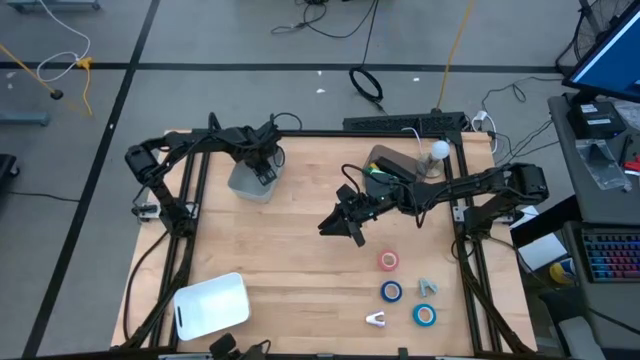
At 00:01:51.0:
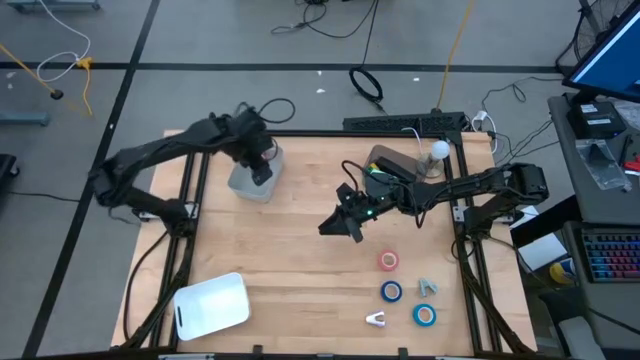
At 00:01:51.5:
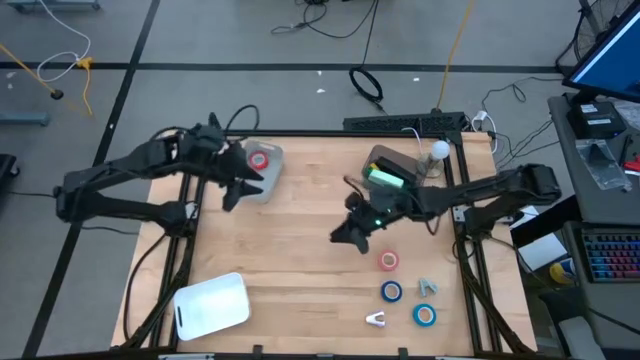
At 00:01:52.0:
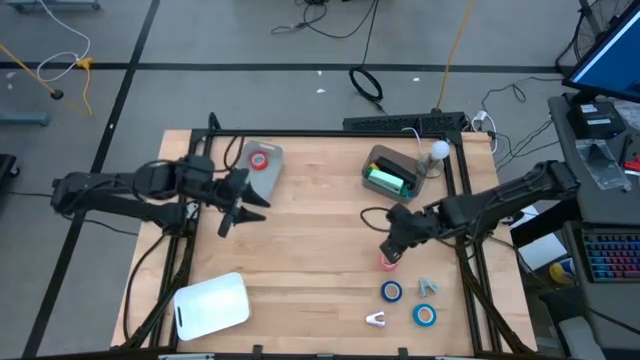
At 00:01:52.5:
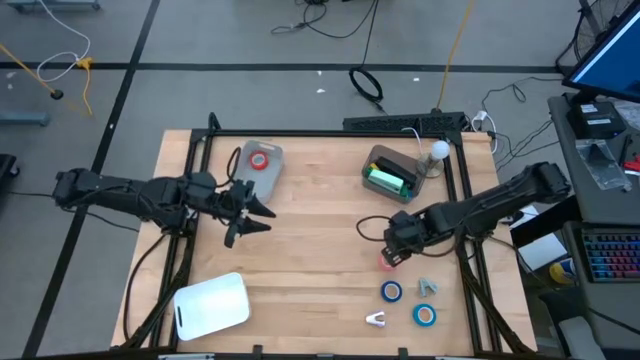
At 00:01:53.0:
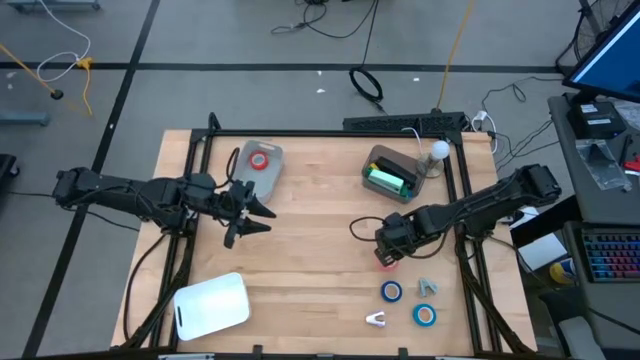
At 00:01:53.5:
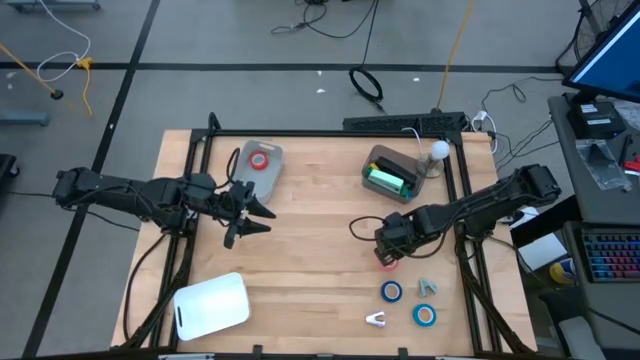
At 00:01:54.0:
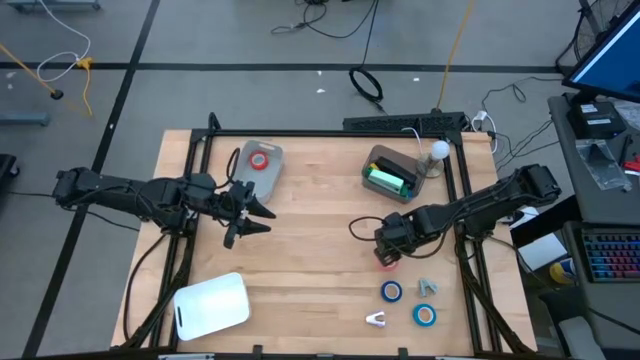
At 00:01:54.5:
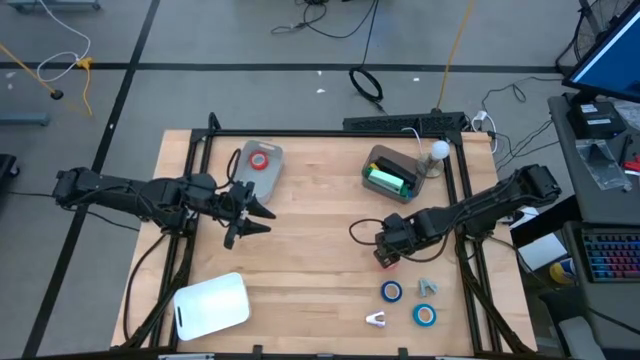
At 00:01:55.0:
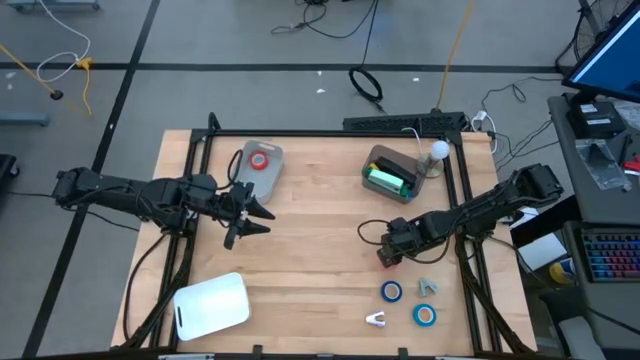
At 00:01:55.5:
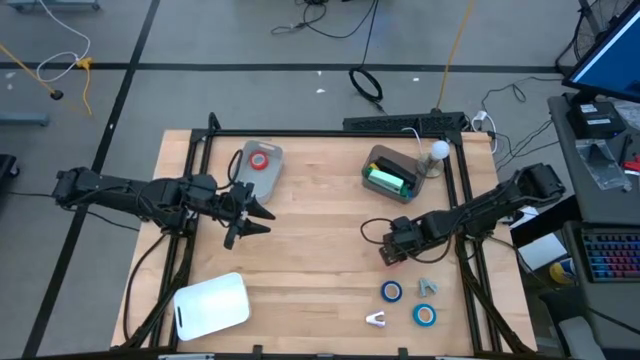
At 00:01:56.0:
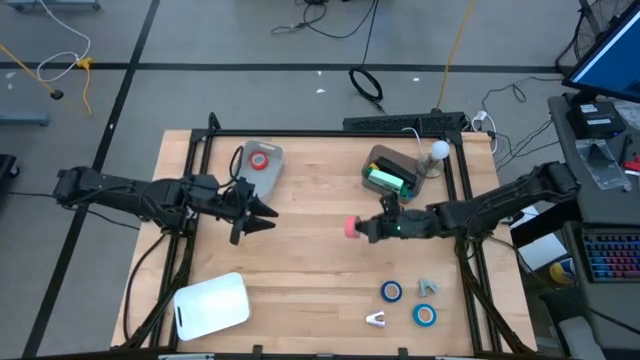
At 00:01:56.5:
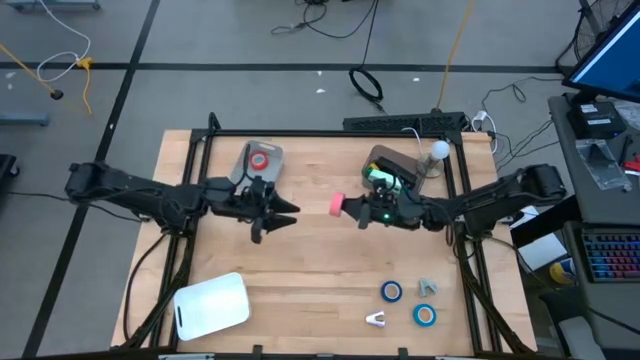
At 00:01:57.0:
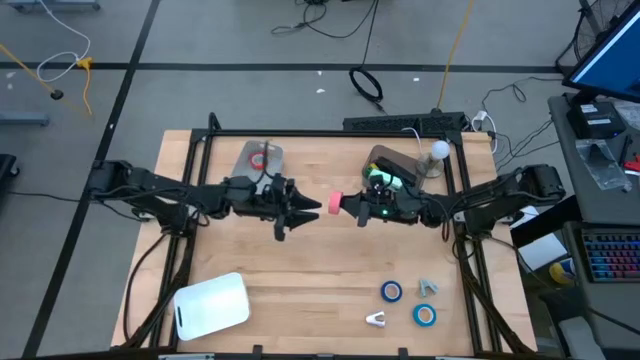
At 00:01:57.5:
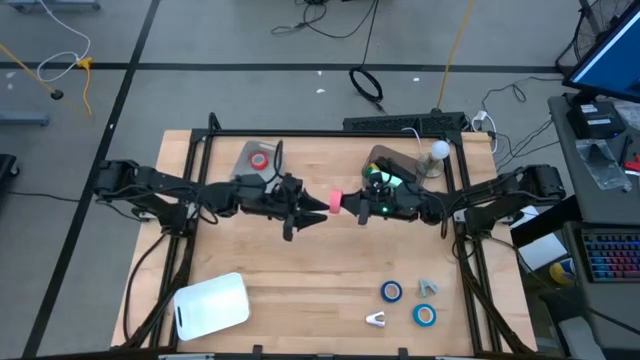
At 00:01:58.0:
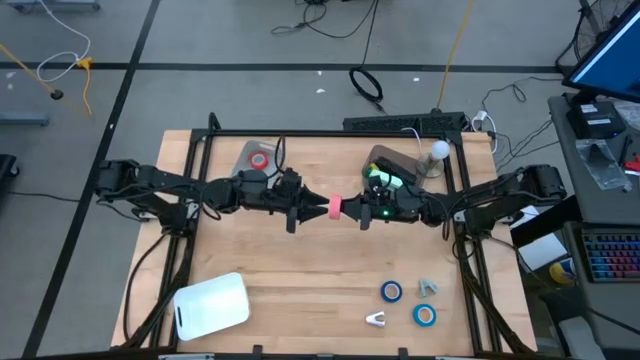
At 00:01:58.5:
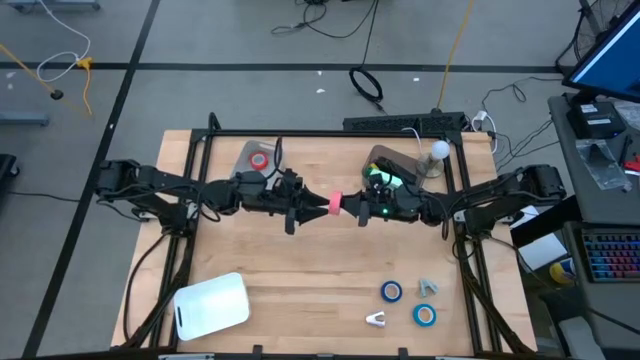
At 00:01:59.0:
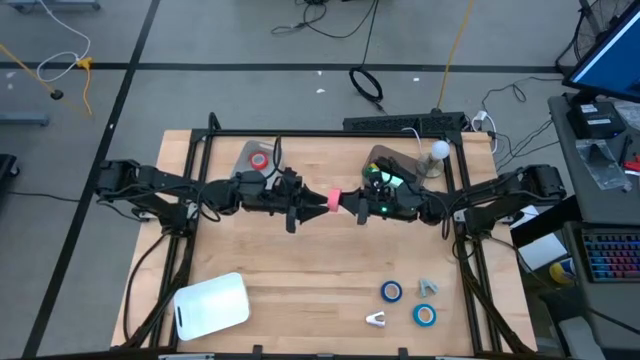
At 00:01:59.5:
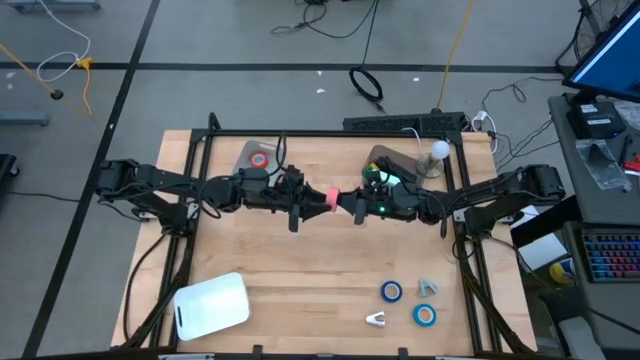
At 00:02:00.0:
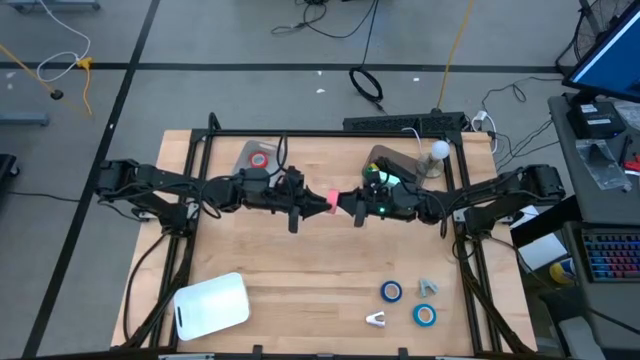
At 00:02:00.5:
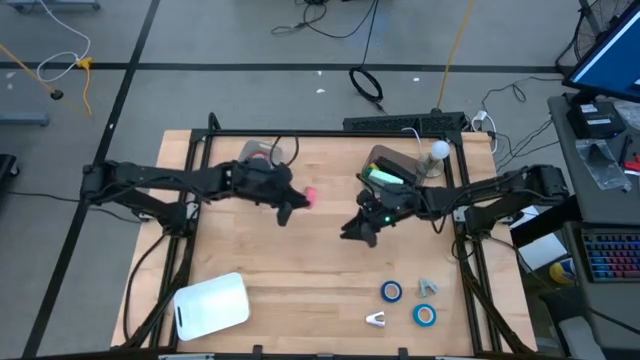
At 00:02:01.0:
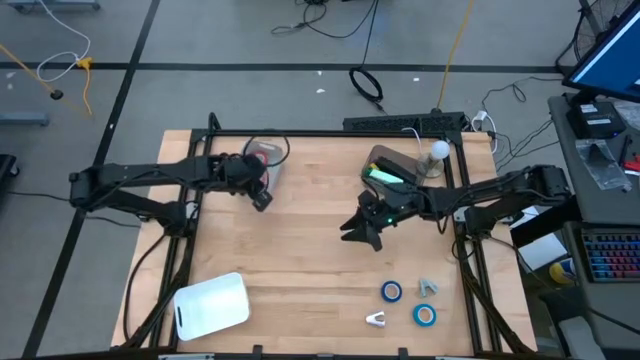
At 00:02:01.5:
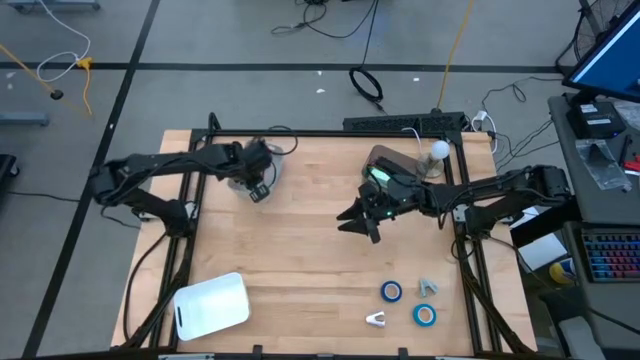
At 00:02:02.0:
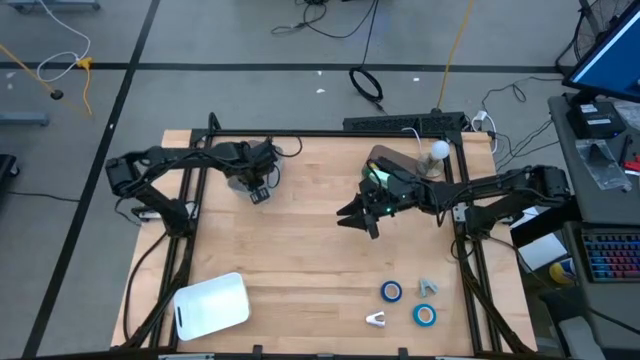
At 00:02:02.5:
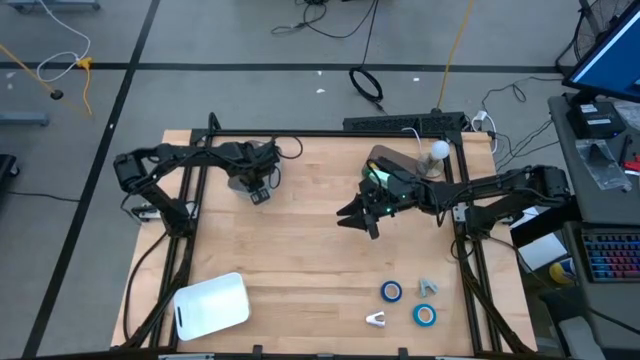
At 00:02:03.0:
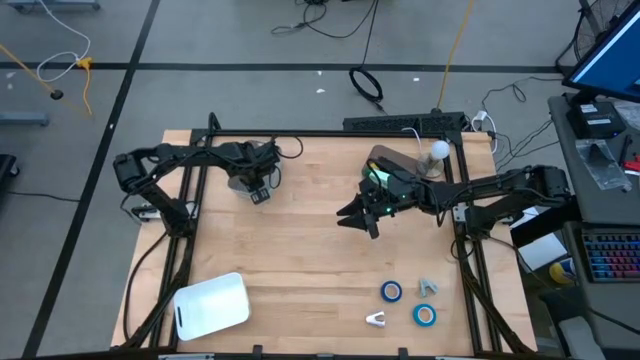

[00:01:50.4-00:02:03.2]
Task: Pick and place Stapler, Stapler remover, tape
Put the pink tape into the gray bin

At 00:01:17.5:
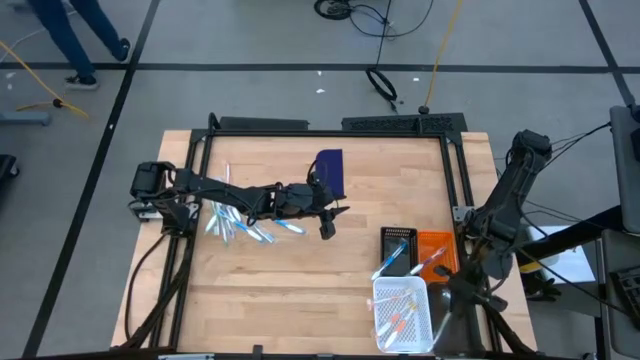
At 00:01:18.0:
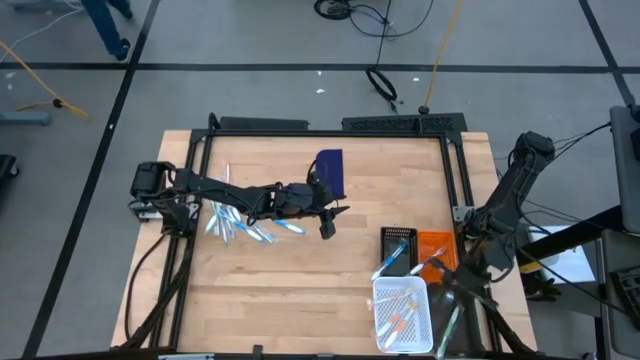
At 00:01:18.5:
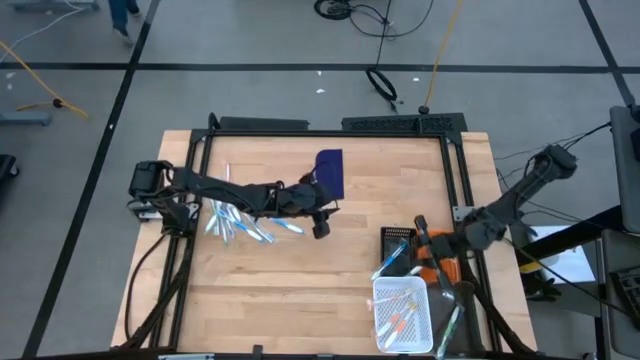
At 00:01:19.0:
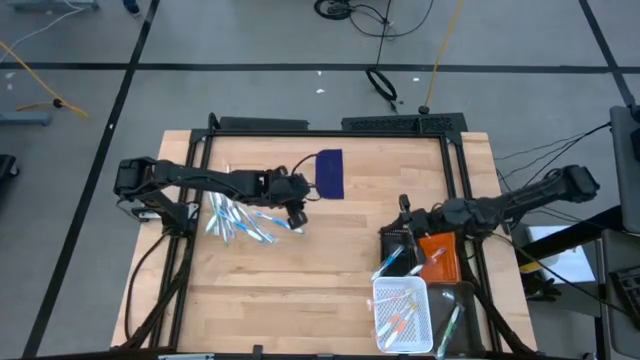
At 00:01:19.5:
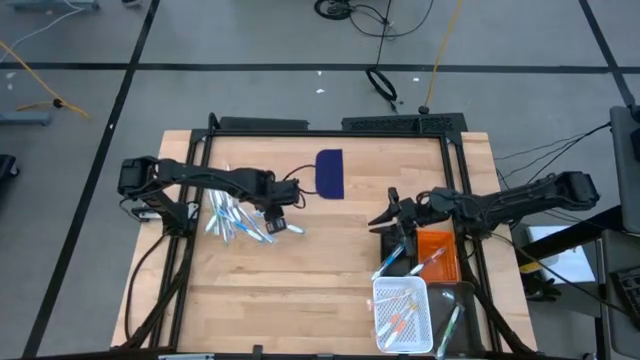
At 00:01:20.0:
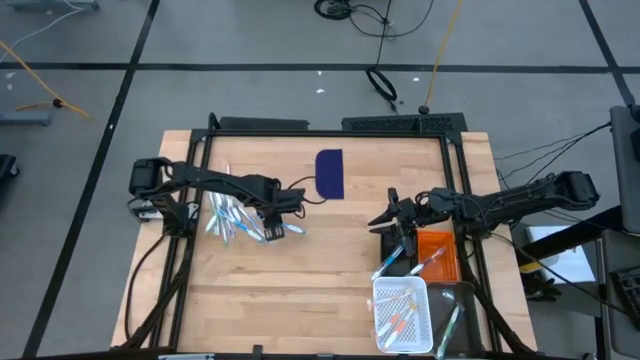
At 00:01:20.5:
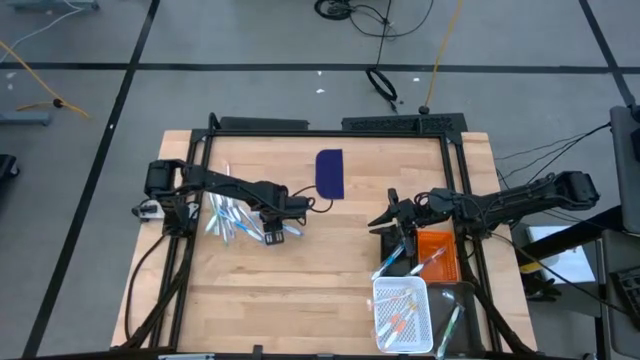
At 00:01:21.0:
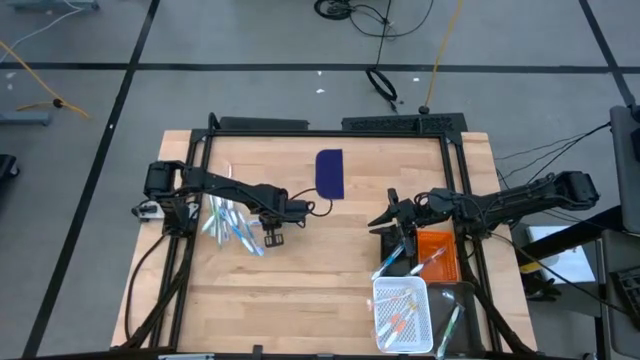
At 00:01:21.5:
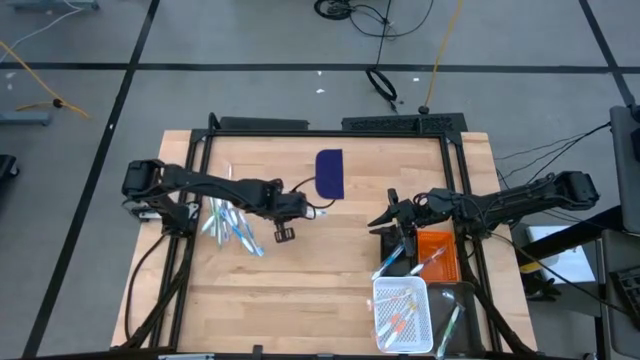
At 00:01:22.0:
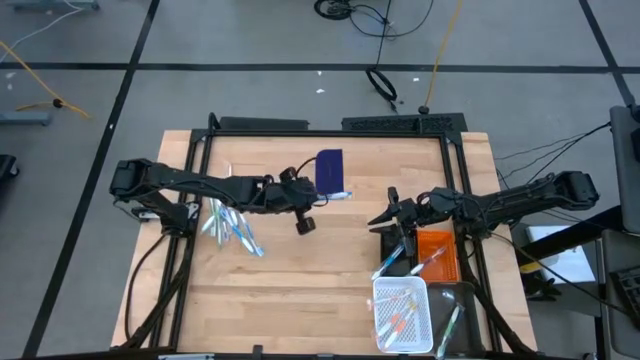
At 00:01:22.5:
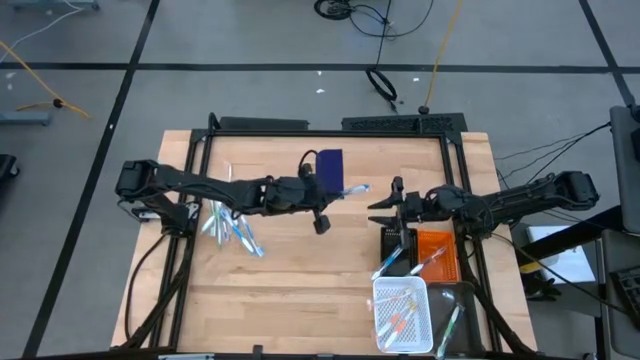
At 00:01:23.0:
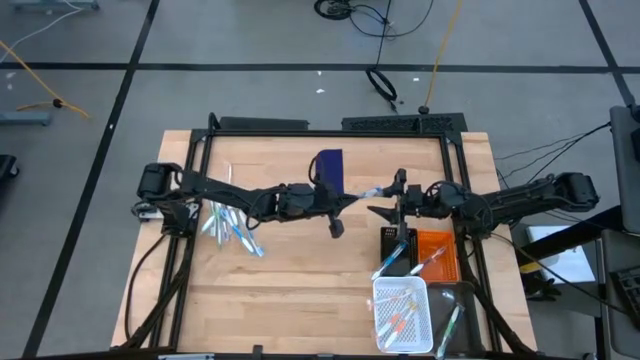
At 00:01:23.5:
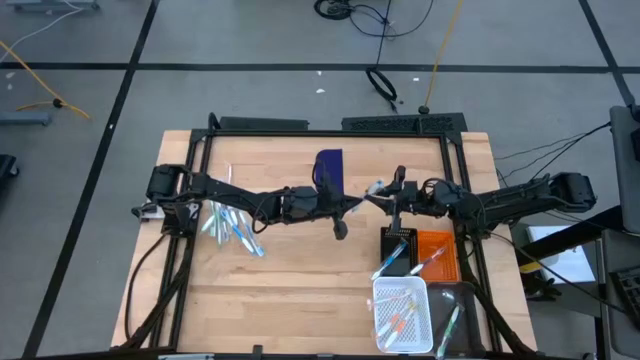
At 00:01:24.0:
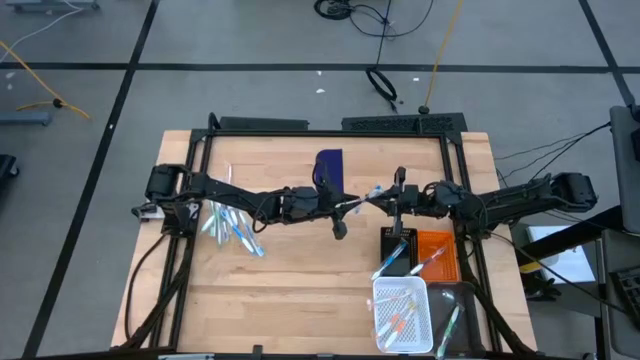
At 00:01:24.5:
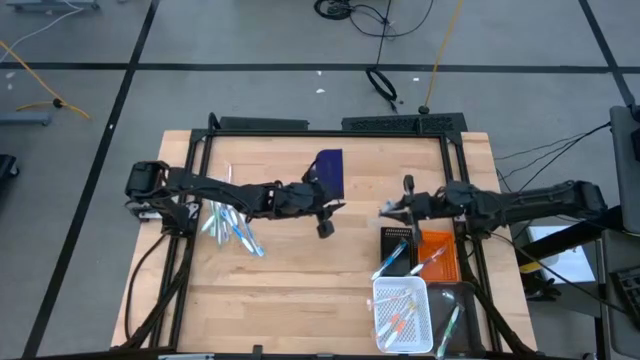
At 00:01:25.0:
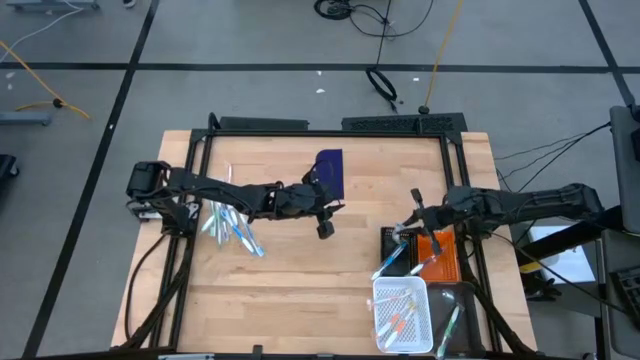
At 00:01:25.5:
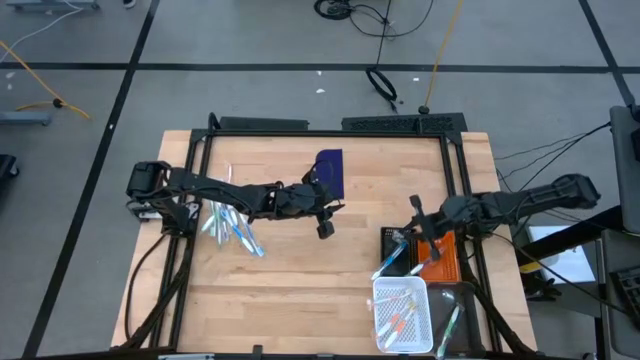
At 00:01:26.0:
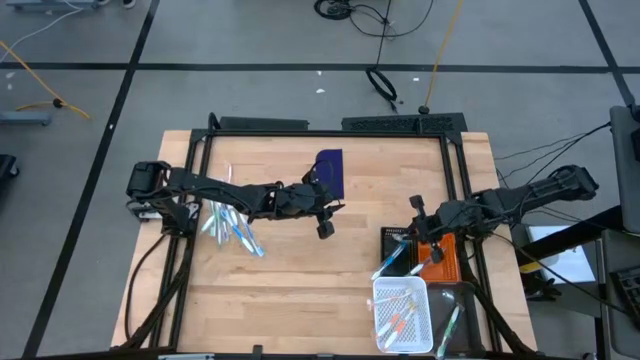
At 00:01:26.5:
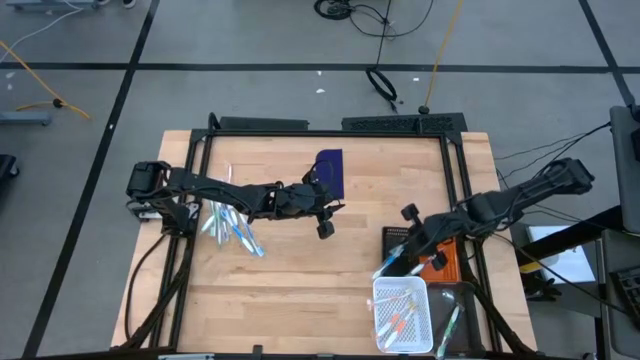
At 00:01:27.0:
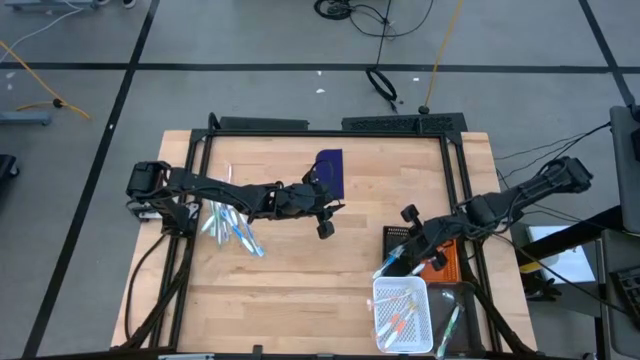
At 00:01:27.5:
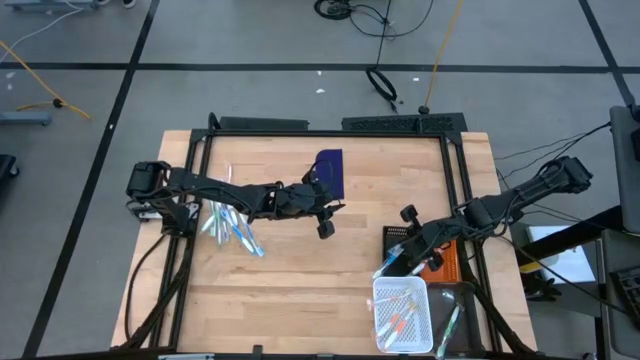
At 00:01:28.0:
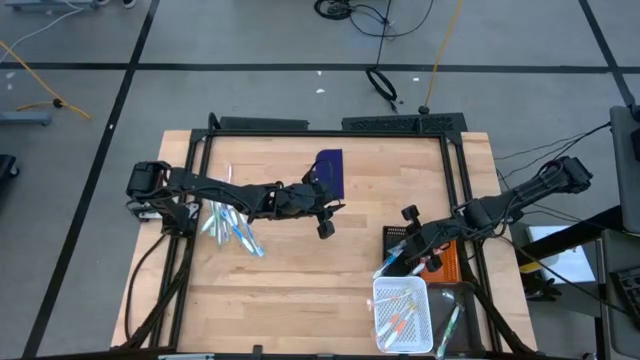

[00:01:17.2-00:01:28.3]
Task: Pick & Place Toothbrushes
Put the blue toothbrush into the black basket
